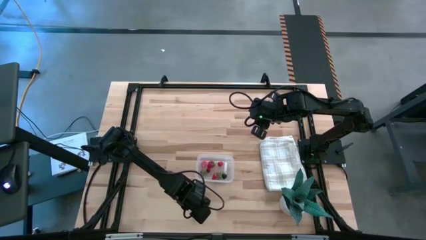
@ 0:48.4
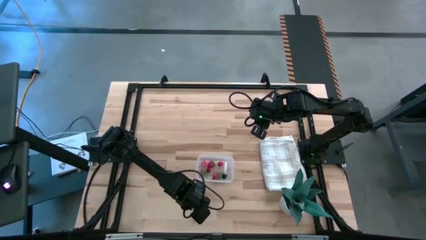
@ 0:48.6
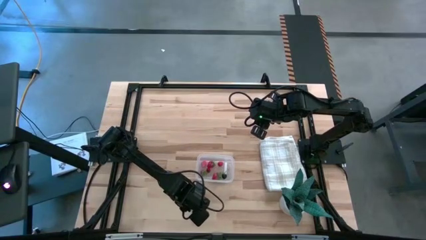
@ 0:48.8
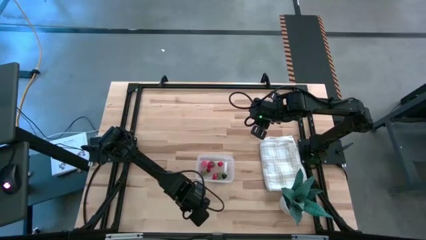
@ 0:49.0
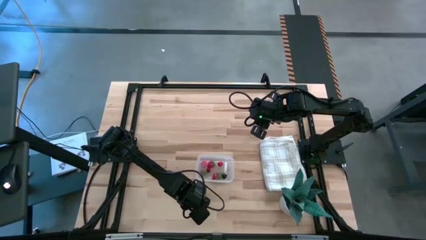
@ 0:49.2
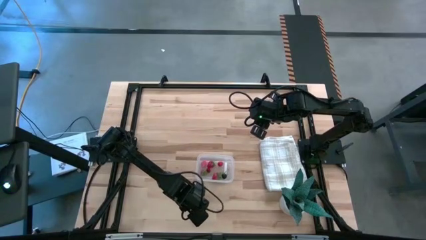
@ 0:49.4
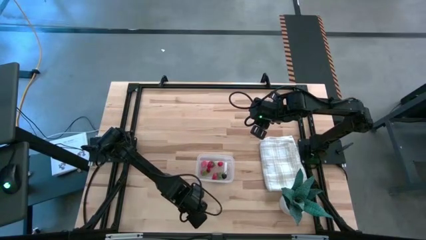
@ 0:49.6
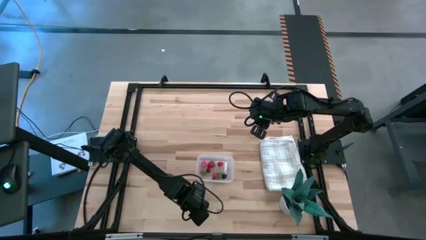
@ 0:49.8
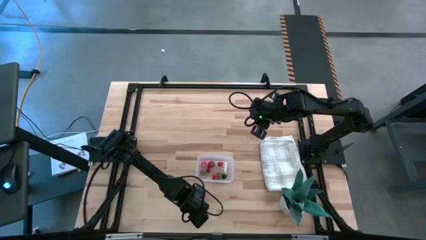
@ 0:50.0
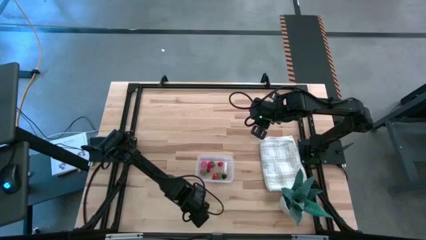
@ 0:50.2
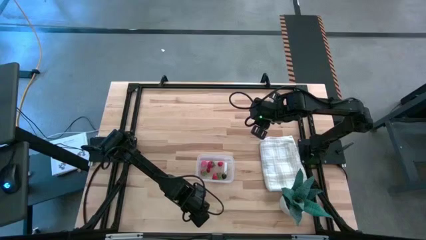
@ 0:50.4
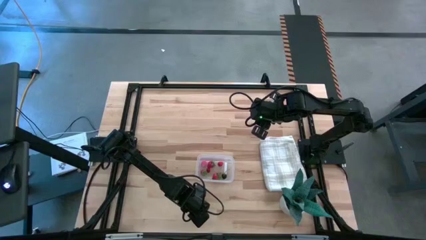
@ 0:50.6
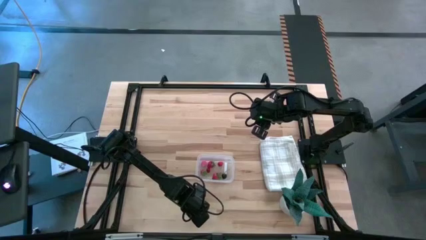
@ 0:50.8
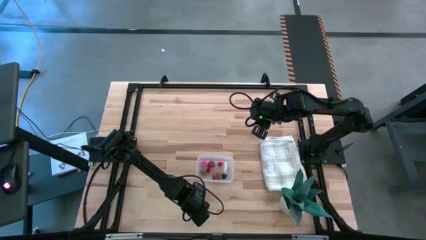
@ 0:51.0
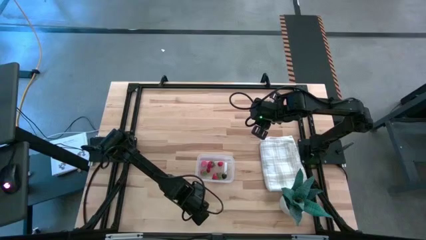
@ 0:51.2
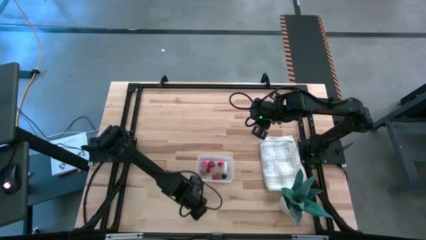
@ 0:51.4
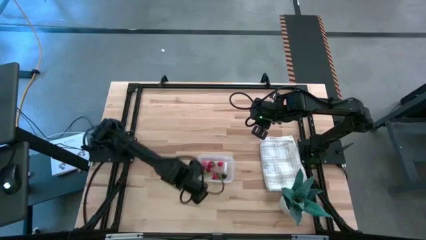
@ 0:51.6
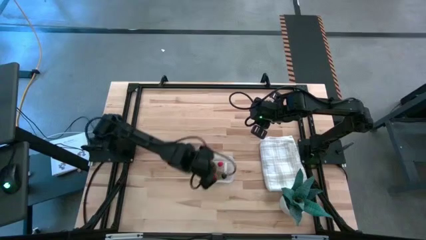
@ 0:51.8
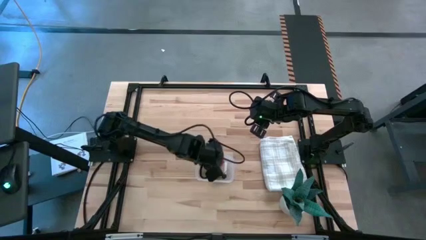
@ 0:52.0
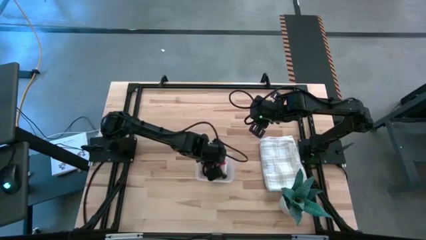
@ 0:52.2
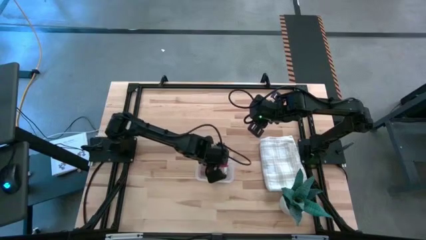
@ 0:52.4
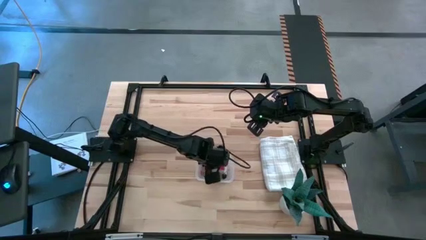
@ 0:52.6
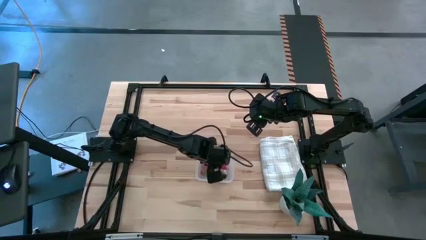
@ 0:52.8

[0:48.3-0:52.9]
Task: Pick and placing Produce into tupperware
Put the strawberry into the bin

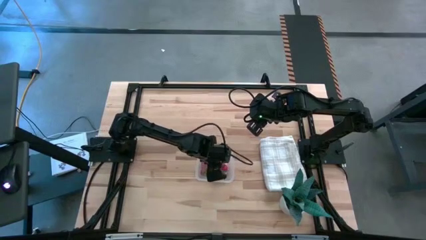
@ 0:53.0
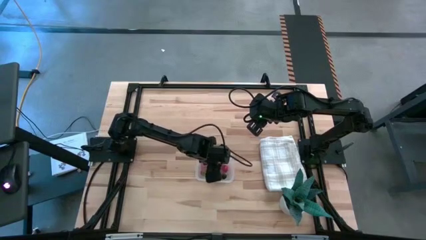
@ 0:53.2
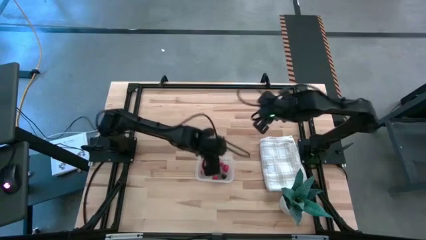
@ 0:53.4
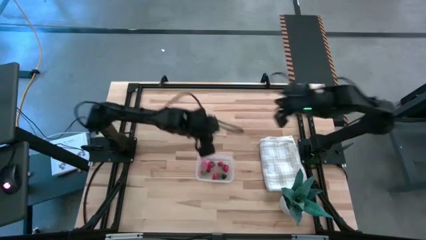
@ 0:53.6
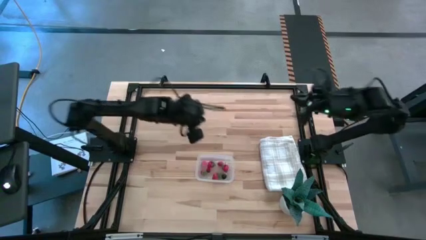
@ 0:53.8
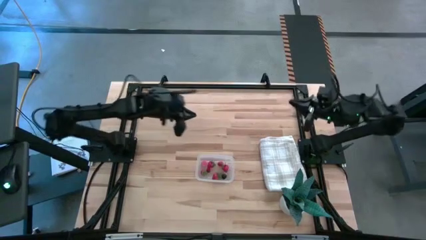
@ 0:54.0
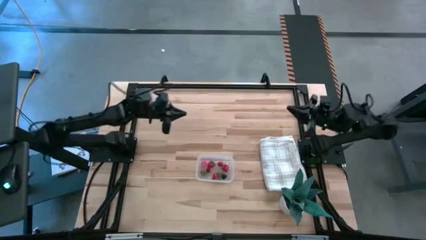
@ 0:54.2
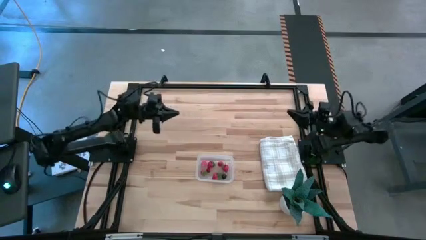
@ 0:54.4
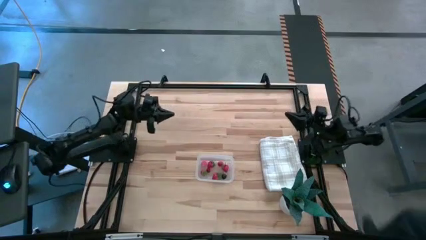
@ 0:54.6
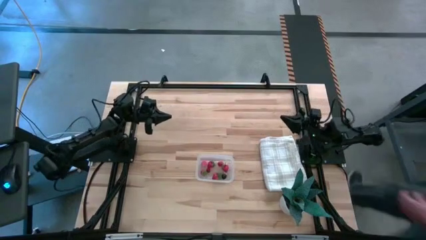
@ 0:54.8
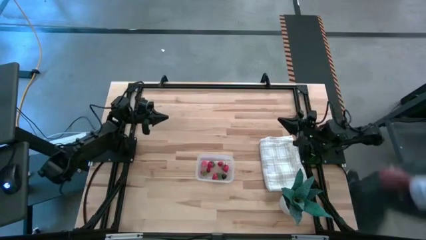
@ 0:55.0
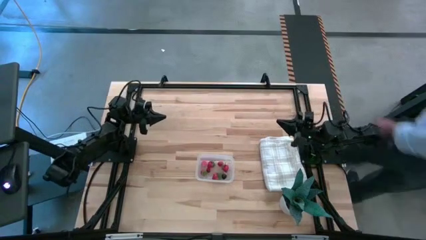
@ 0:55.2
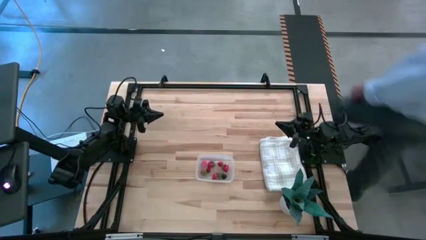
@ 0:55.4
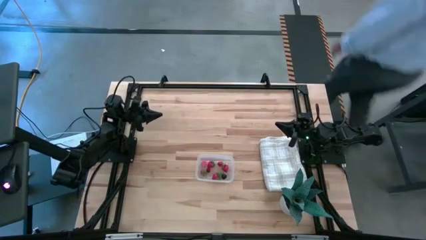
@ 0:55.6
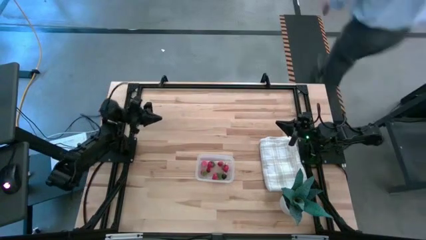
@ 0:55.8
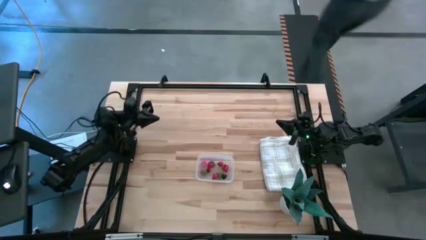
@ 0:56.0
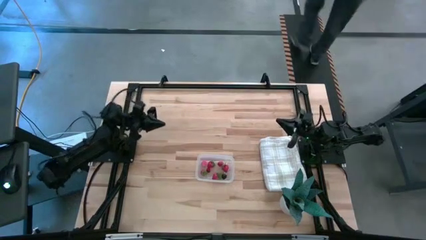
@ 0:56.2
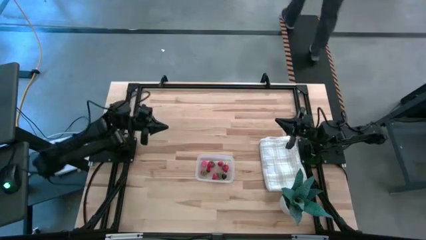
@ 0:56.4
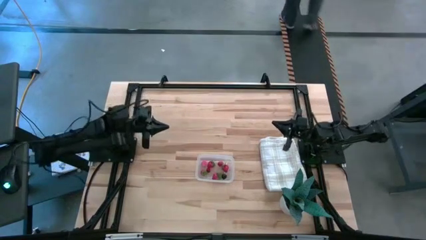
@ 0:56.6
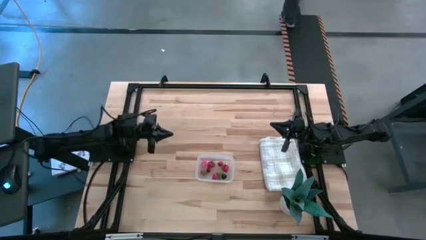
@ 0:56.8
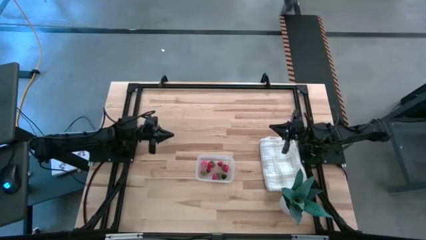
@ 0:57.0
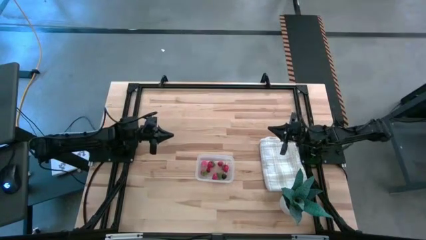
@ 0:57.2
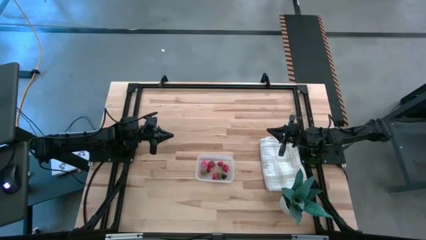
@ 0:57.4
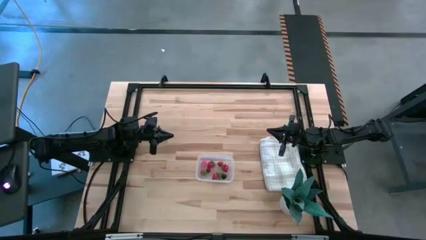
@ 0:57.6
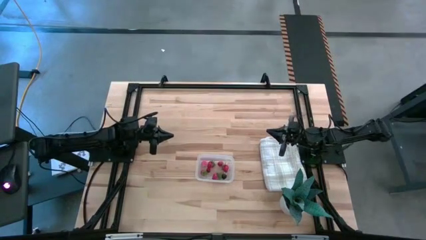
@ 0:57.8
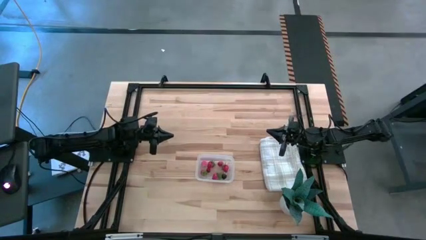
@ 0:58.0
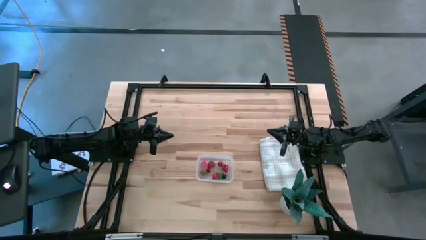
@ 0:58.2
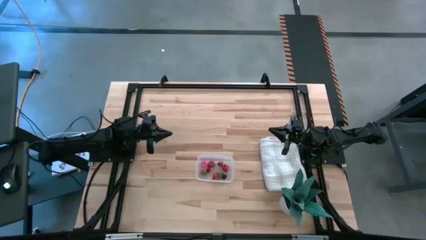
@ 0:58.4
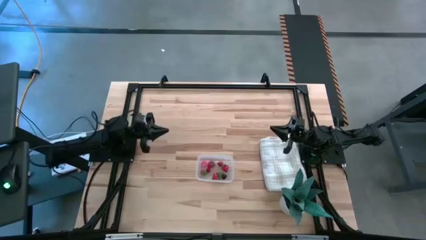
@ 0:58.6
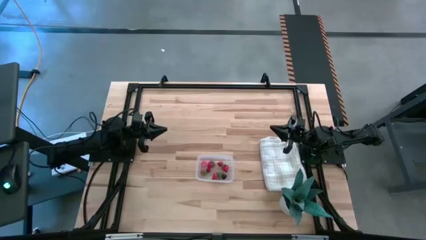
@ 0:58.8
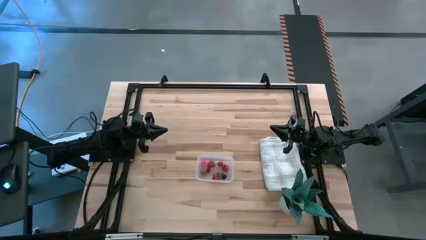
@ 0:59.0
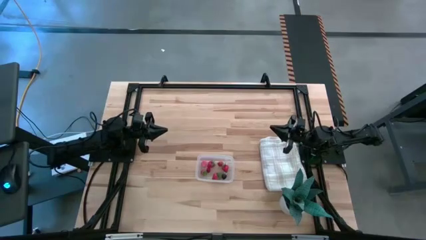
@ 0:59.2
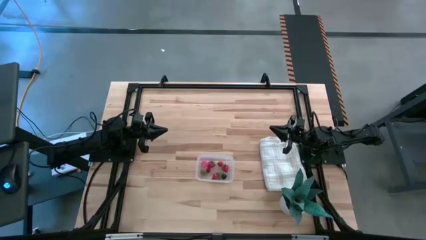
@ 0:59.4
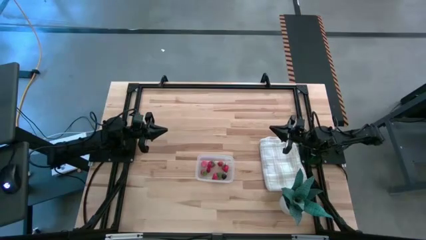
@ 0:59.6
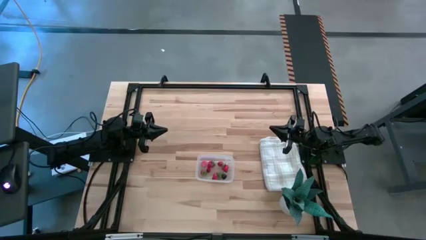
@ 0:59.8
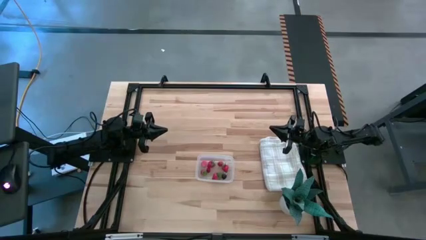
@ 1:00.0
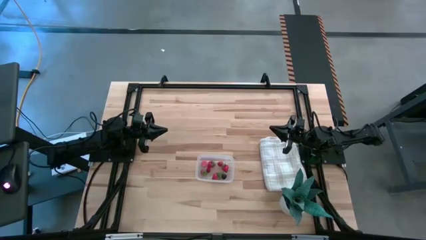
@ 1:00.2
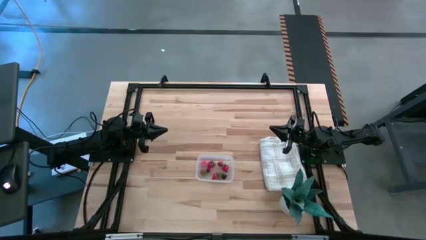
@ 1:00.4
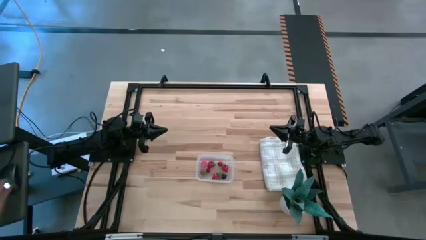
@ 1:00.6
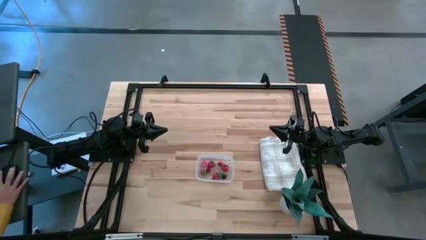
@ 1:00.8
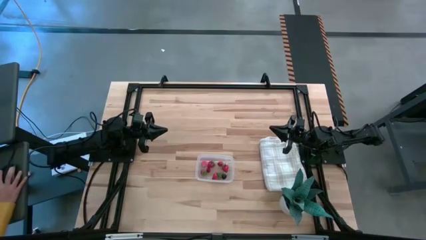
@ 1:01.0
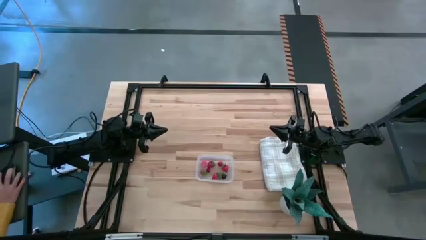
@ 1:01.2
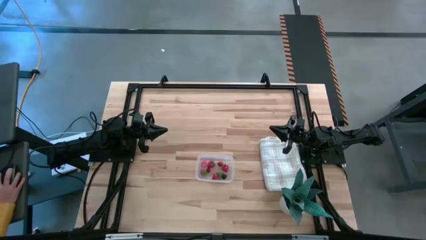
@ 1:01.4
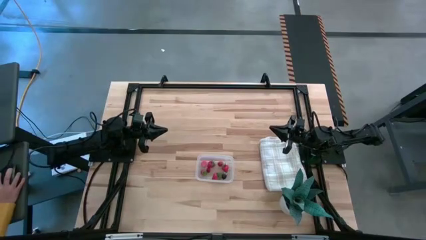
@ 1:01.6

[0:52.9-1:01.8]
Return to Home Position

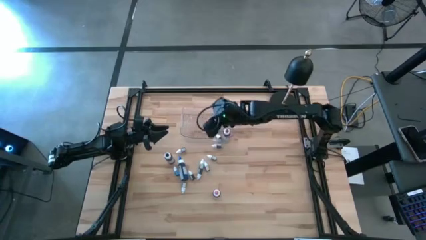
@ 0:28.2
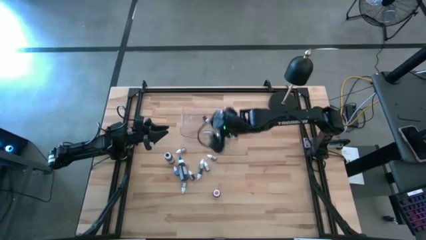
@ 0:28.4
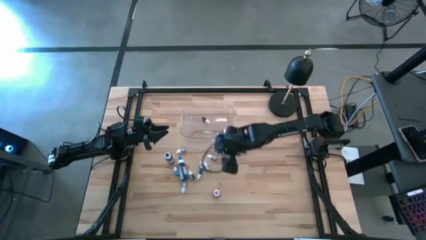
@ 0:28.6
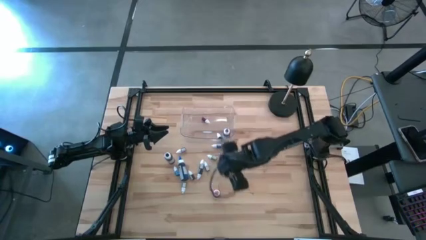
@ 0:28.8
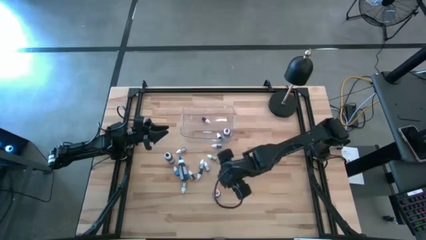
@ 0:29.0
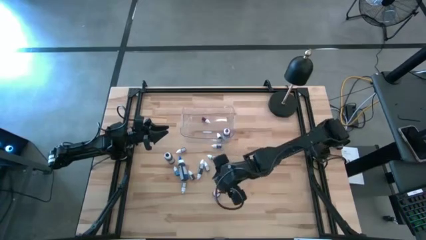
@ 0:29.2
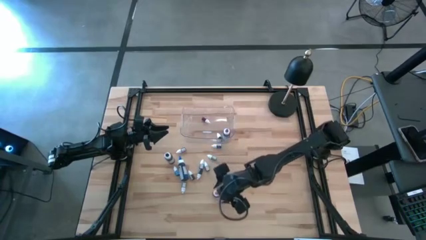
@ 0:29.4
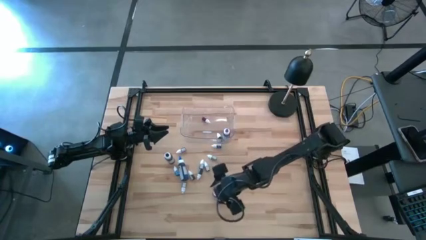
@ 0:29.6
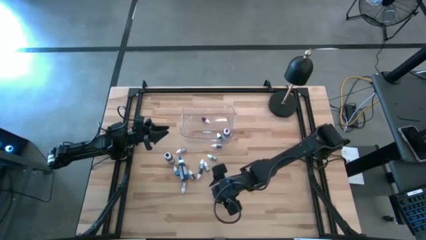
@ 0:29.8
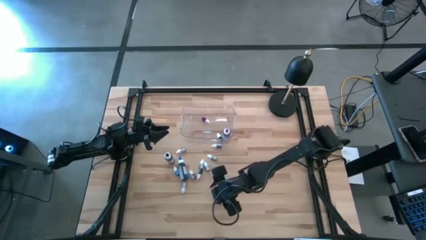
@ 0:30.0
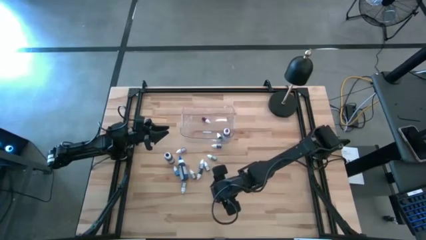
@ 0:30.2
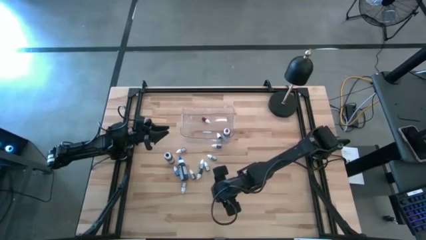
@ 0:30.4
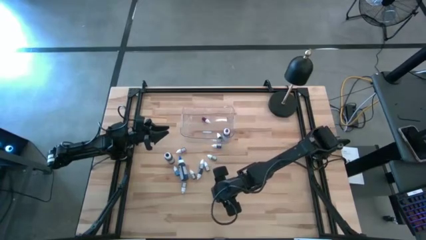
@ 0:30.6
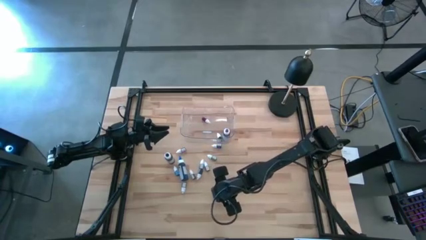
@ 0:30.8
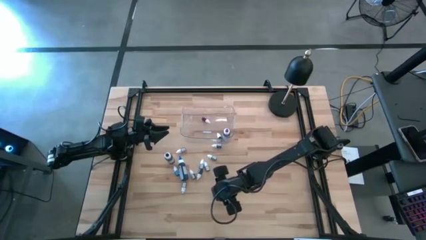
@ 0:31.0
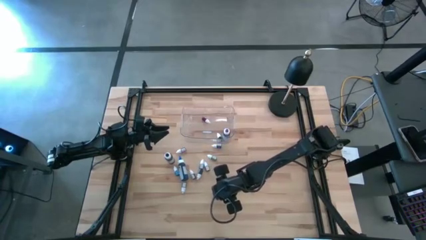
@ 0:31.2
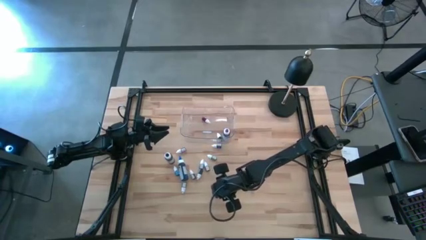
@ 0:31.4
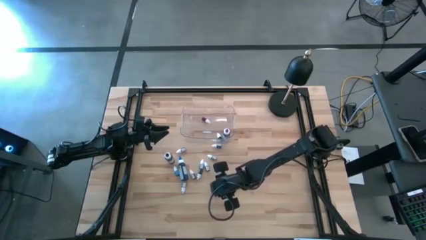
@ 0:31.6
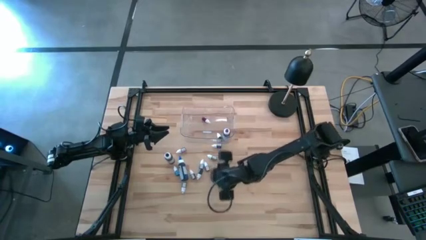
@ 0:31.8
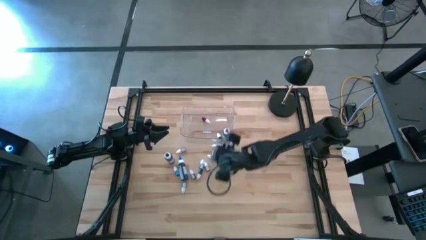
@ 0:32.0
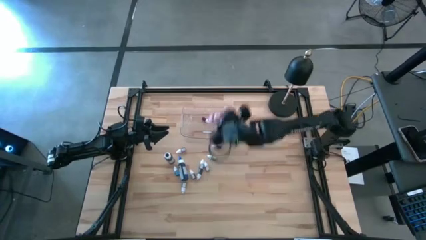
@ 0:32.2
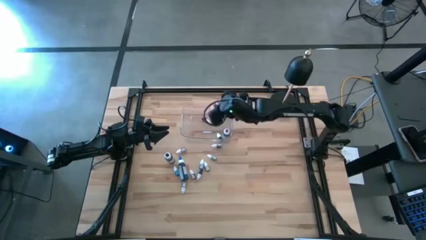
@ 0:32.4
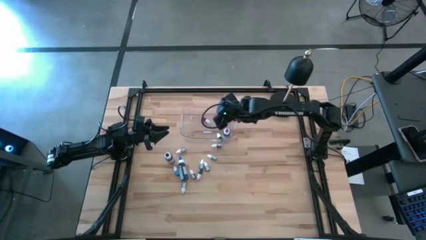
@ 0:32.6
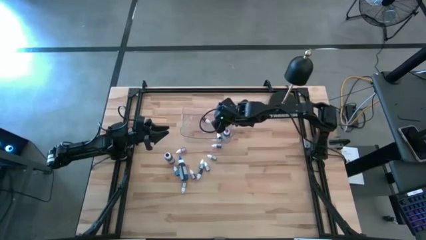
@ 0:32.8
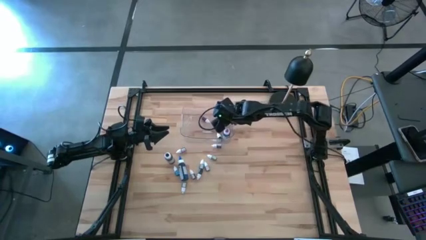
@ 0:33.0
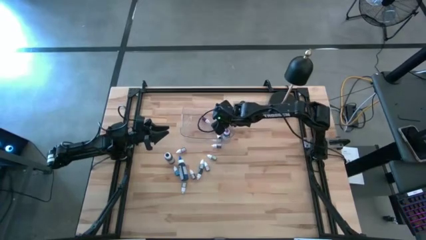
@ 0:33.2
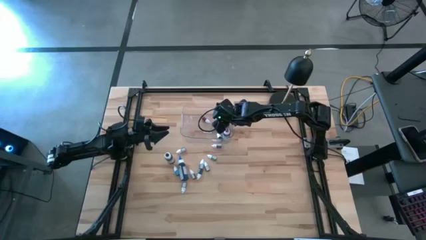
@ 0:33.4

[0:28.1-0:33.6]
Task: Pick & Place food coloring
Put the large pink food coloring bottle into the transparent bin
